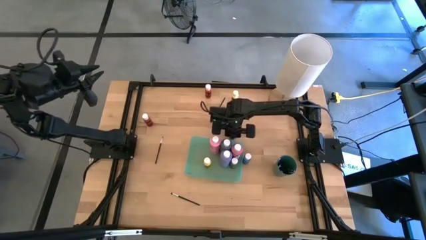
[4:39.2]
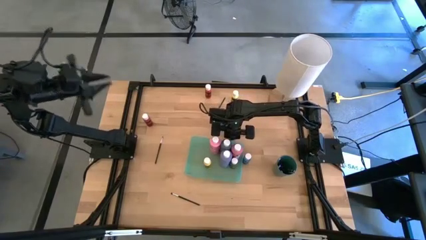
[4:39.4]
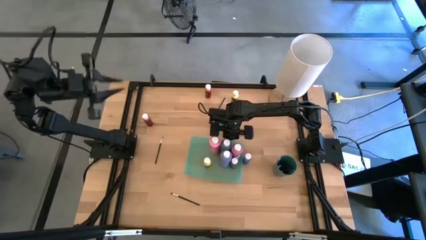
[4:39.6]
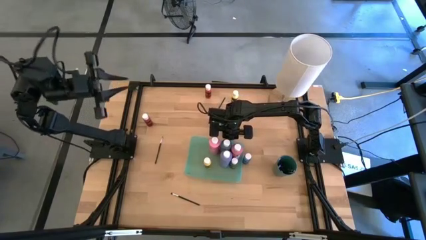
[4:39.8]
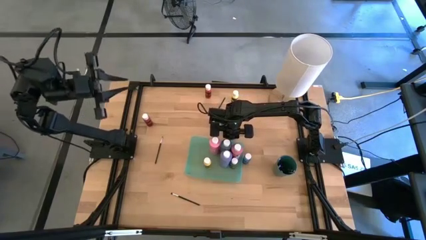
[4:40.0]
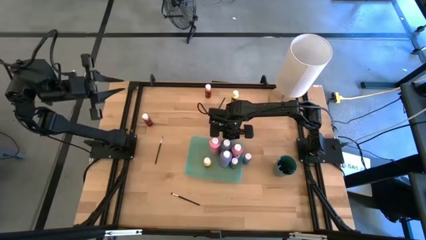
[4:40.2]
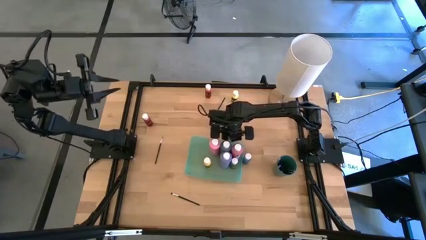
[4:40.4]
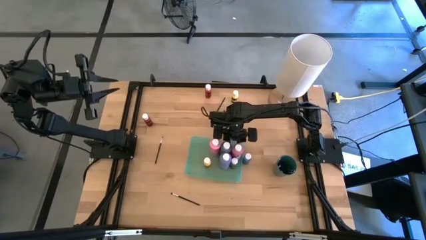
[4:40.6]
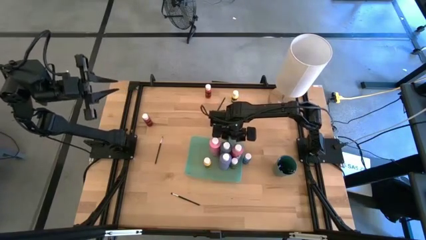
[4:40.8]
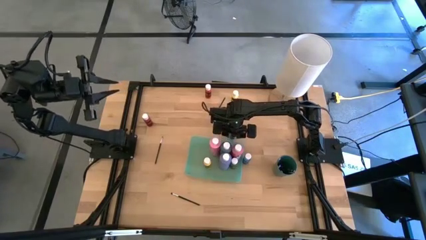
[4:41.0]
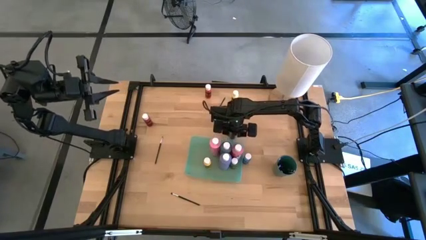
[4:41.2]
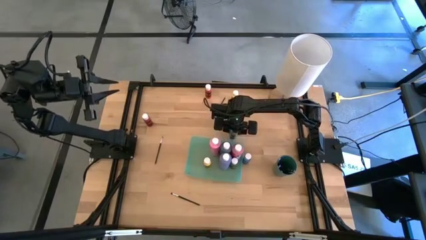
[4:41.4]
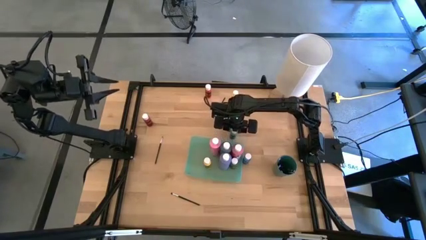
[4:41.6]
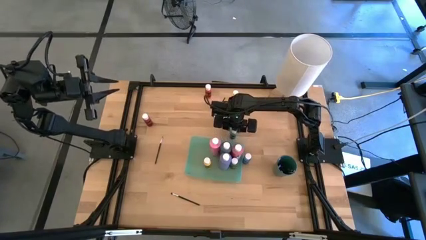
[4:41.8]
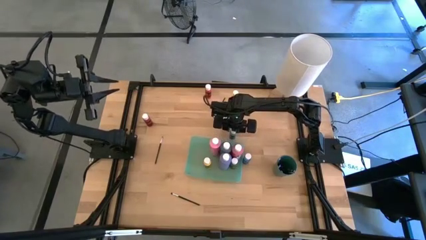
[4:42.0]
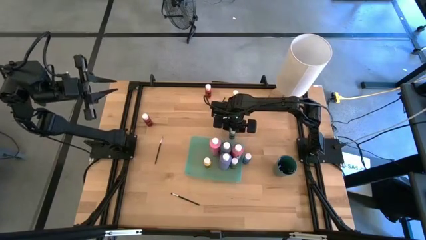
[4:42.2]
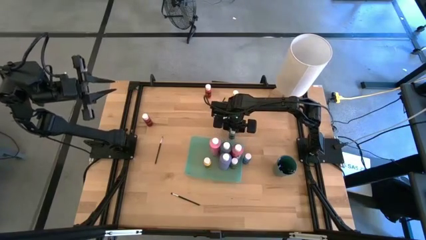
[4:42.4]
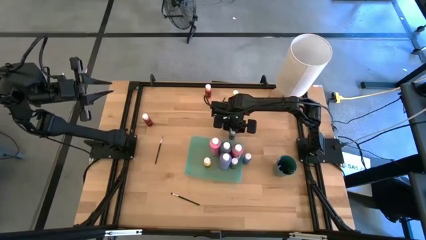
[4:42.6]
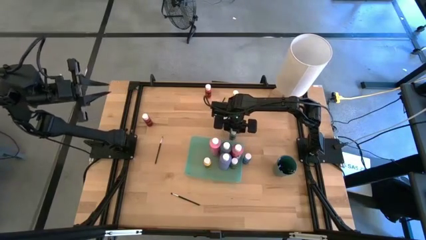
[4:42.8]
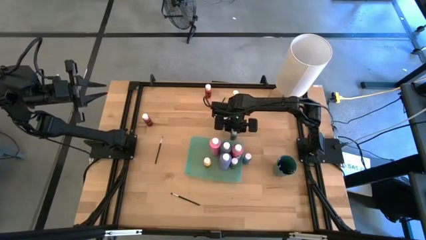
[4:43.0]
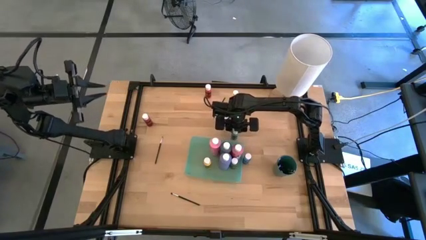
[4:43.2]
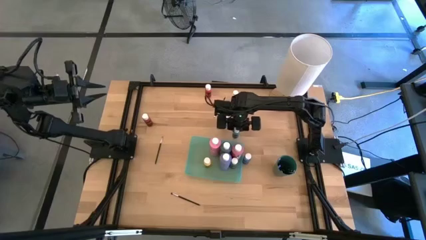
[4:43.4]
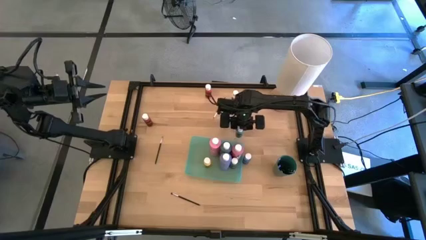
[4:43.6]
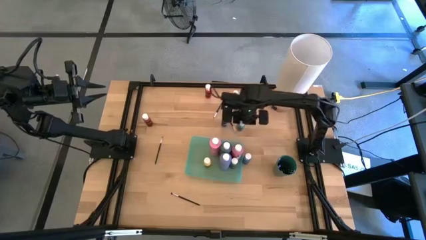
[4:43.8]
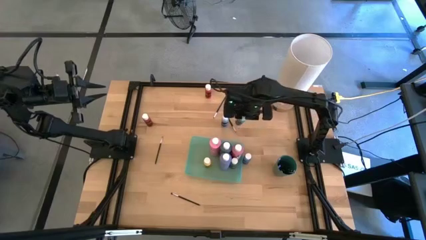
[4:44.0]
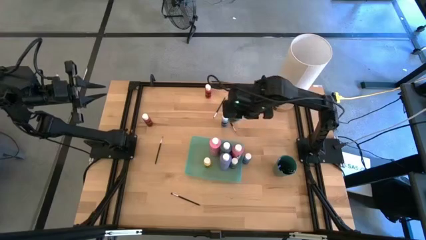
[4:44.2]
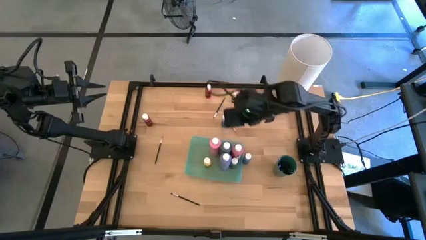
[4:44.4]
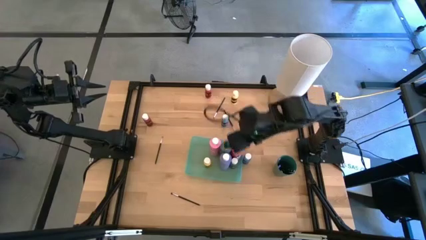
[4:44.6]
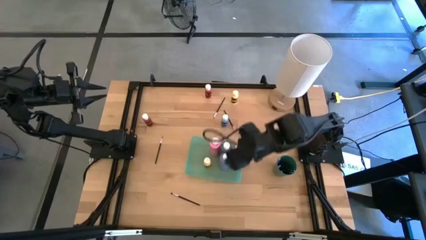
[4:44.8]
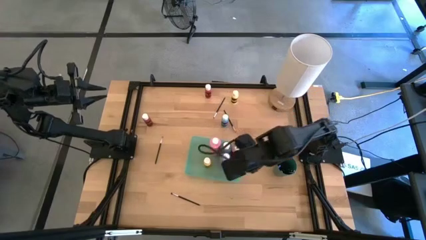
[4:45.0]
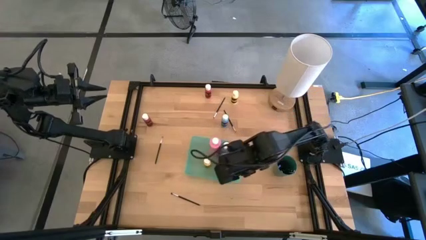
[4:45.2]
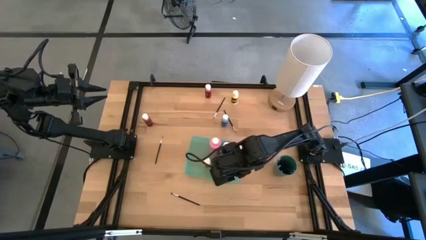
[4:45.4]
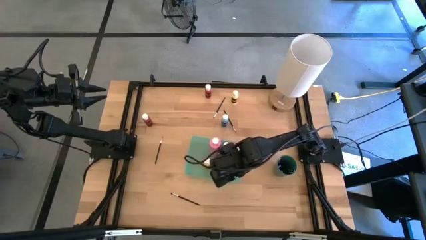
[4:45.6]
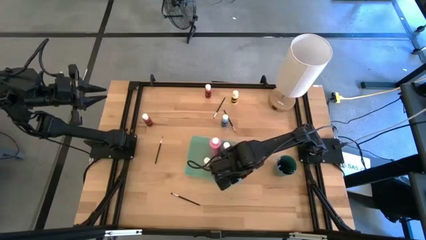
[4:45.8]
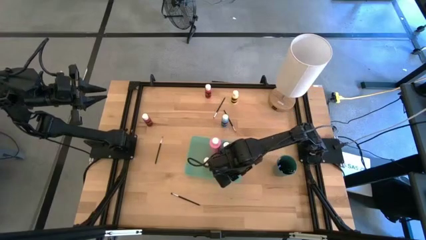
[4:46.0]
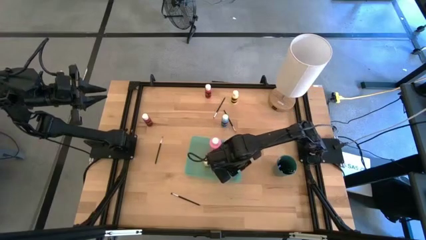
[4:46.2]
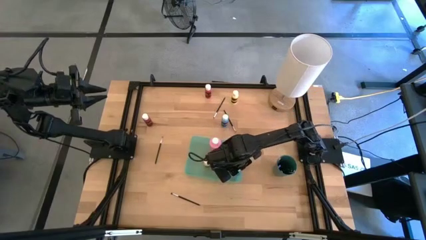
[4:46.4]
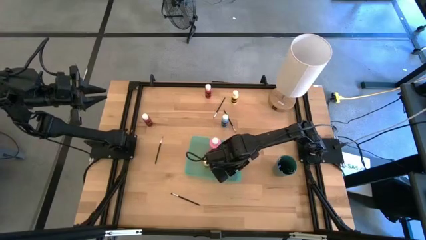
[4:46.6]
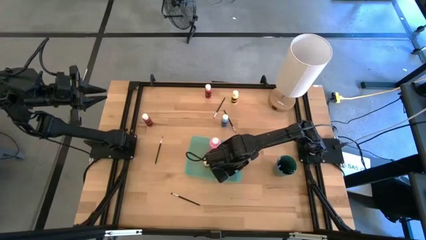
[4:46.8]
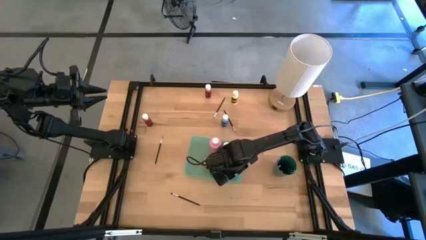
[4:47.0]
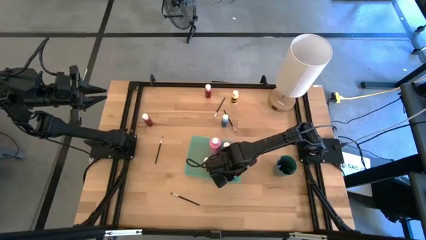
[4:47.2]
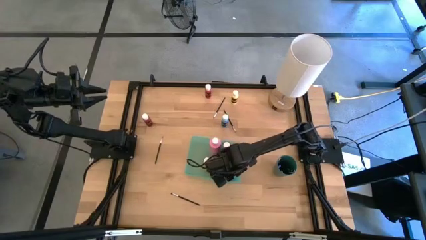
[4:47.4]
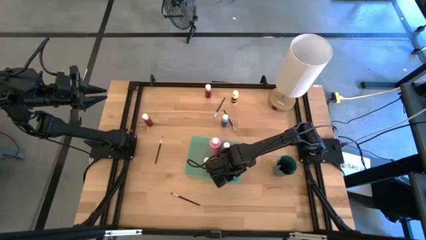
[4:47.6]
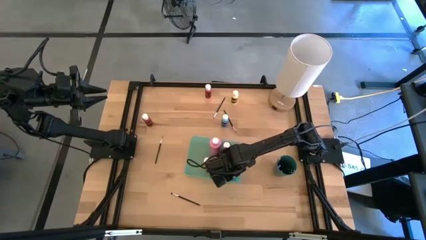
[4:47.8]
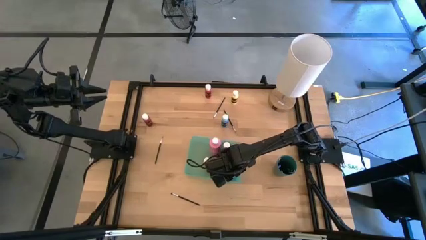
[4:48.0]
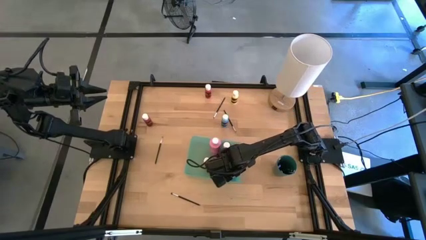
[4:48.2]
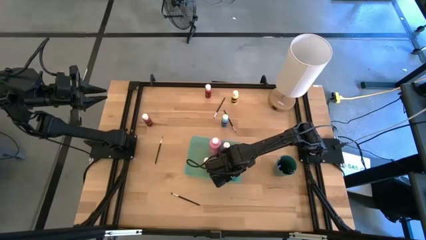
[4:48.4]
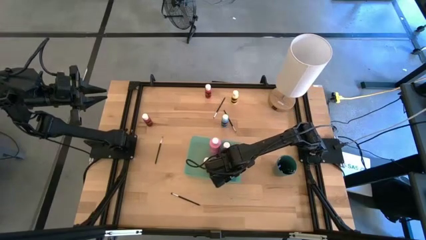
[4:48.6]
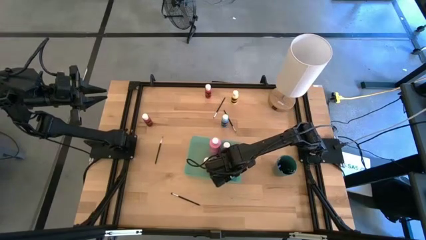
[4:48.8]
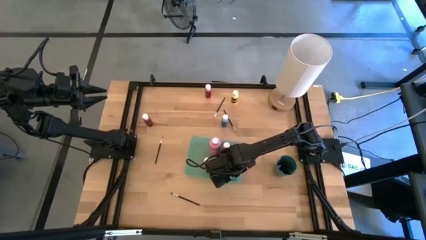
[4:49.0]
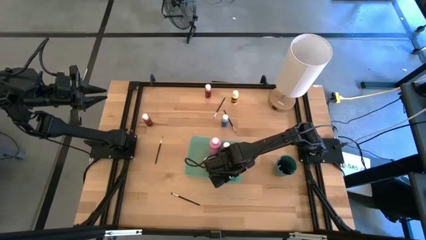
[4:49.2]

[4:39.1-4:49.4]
Task: Pick & Place Paint Supplies
Put the green paint bottle into the light green bin
